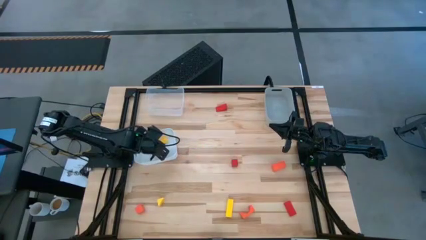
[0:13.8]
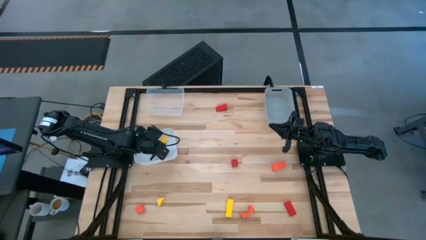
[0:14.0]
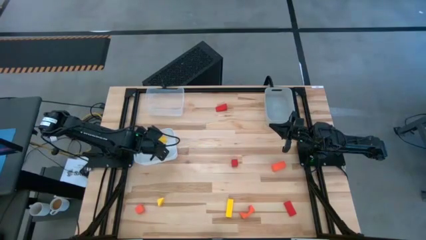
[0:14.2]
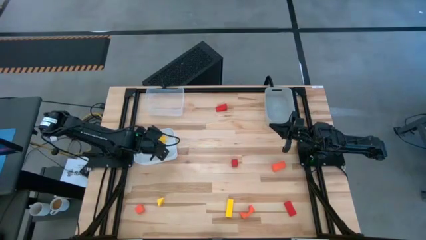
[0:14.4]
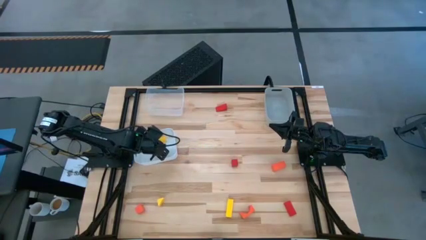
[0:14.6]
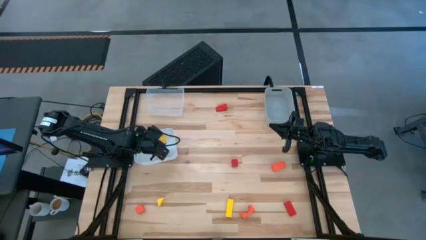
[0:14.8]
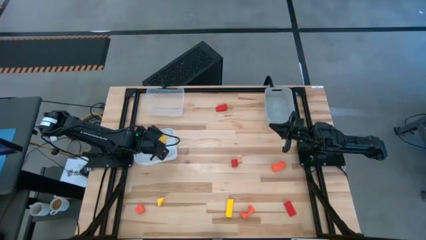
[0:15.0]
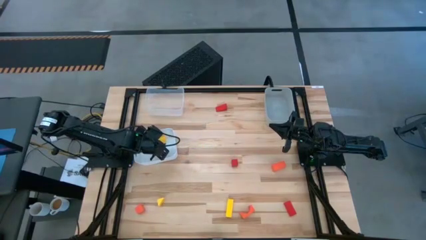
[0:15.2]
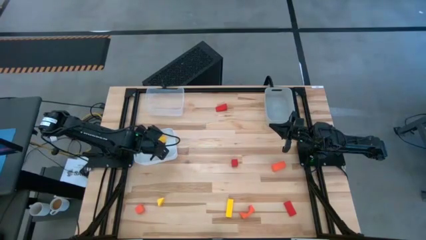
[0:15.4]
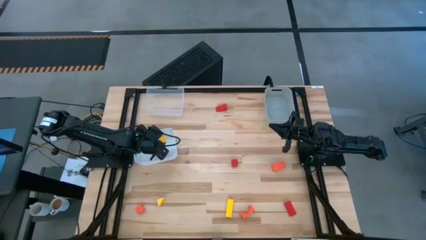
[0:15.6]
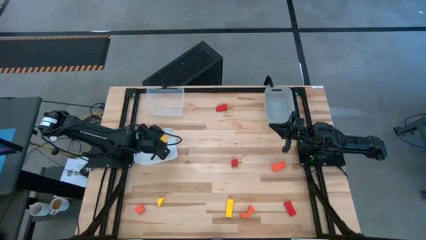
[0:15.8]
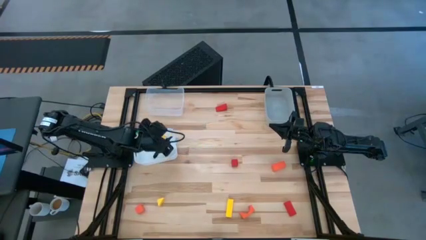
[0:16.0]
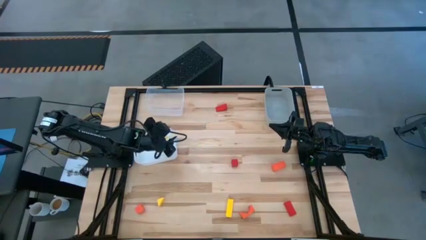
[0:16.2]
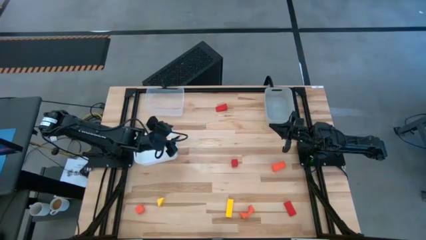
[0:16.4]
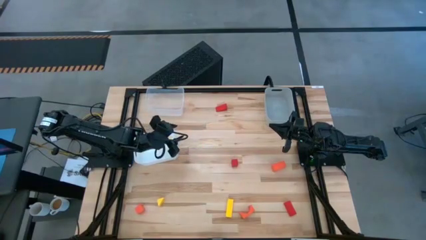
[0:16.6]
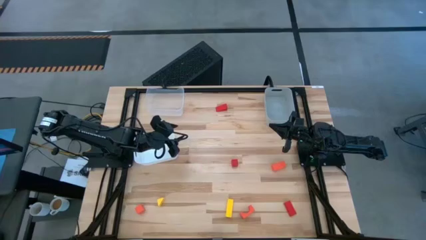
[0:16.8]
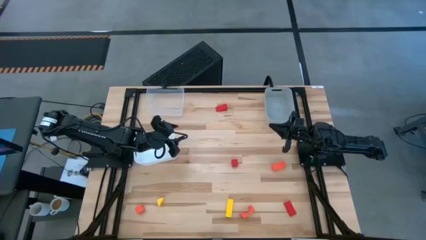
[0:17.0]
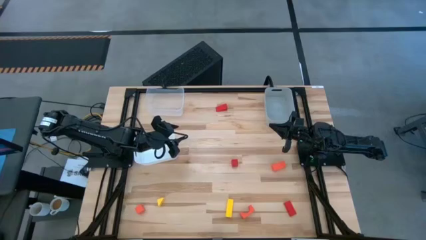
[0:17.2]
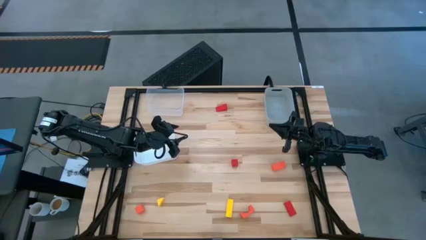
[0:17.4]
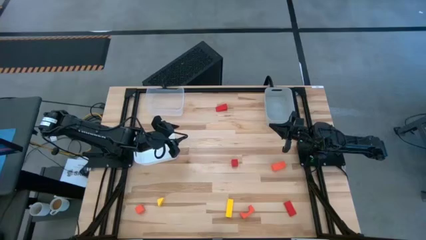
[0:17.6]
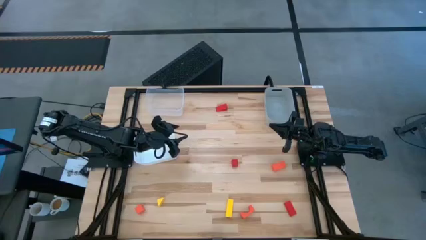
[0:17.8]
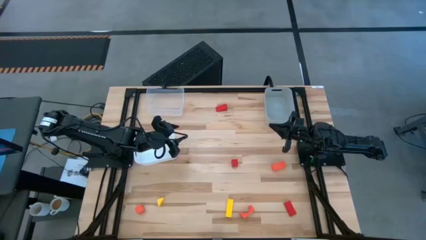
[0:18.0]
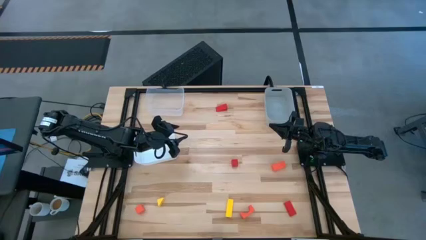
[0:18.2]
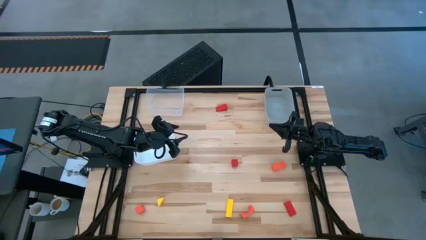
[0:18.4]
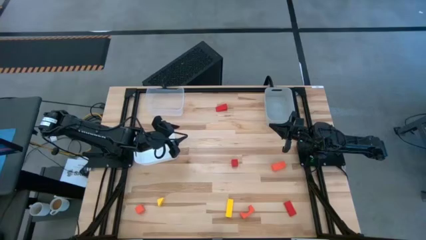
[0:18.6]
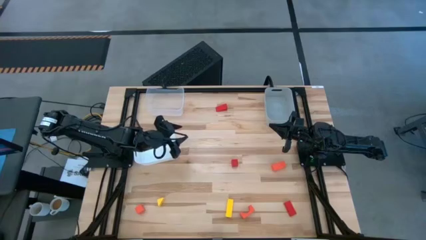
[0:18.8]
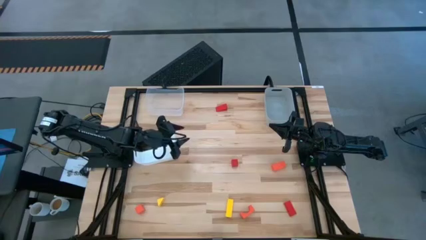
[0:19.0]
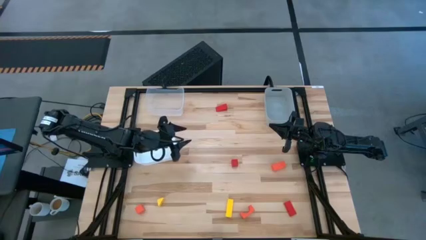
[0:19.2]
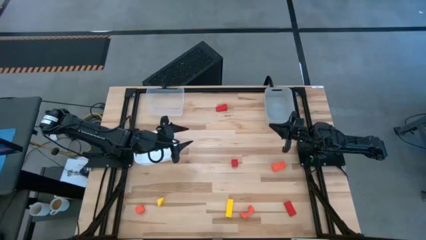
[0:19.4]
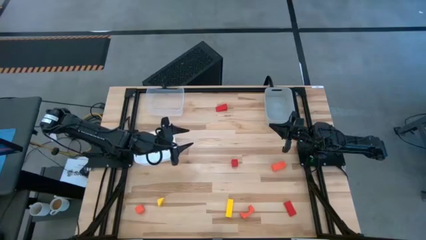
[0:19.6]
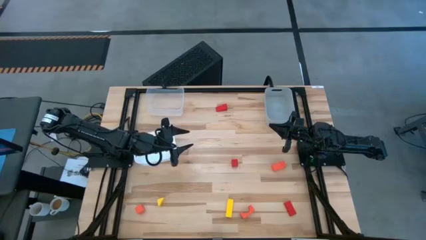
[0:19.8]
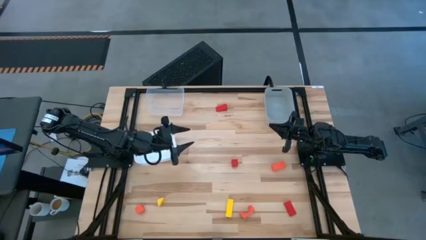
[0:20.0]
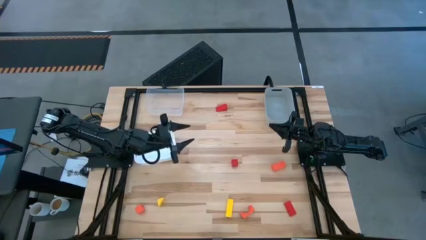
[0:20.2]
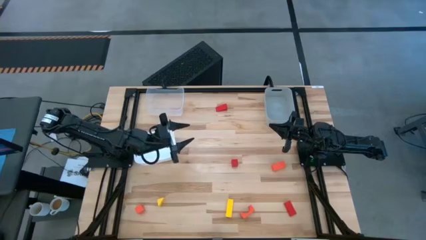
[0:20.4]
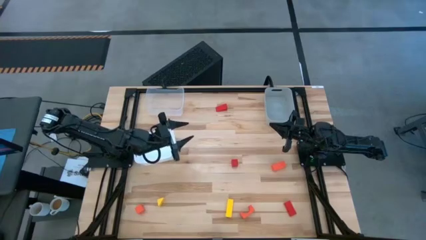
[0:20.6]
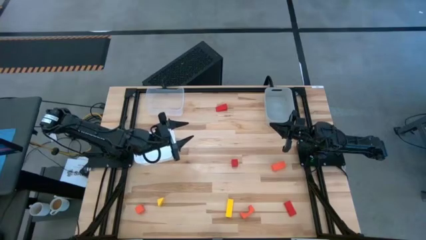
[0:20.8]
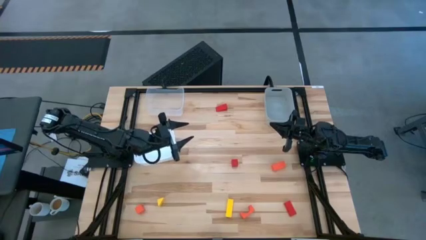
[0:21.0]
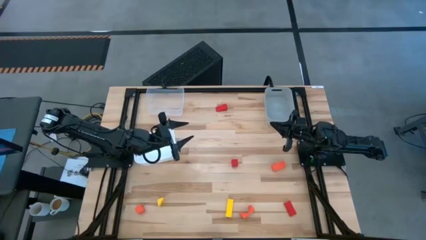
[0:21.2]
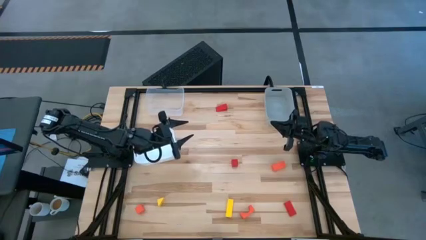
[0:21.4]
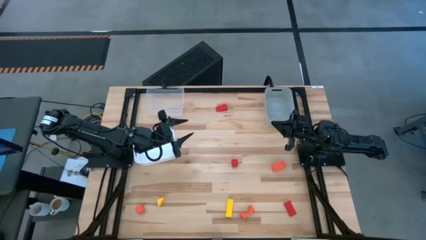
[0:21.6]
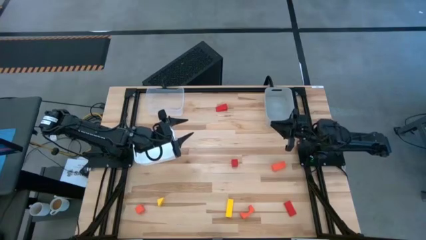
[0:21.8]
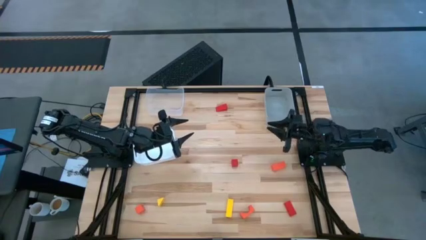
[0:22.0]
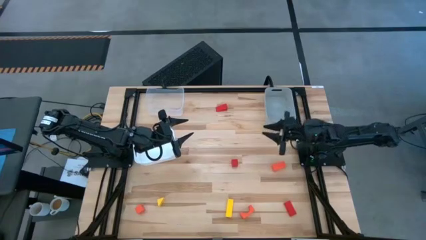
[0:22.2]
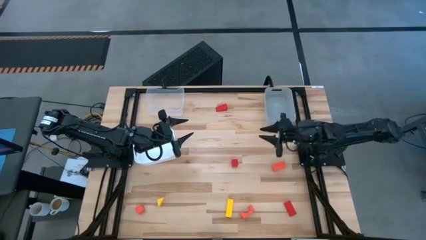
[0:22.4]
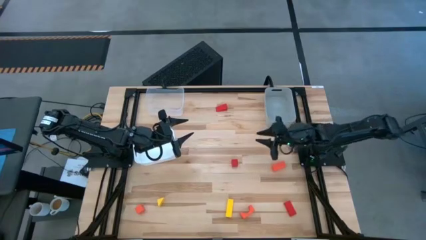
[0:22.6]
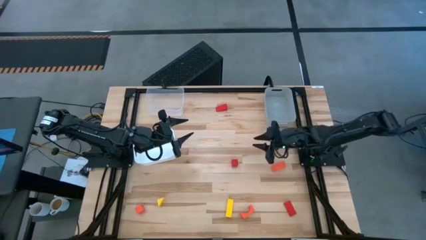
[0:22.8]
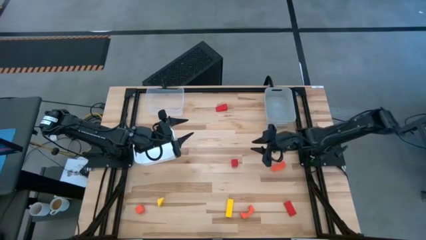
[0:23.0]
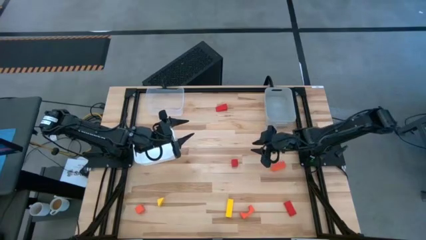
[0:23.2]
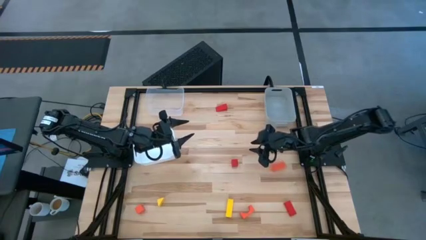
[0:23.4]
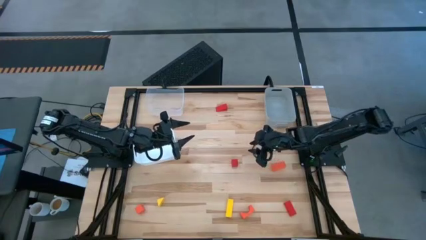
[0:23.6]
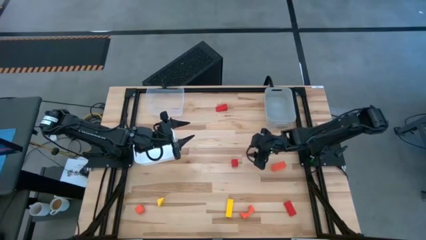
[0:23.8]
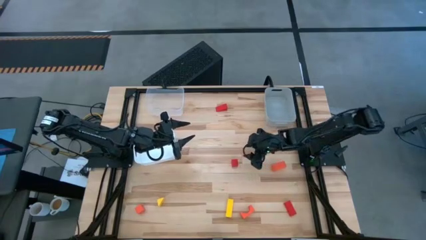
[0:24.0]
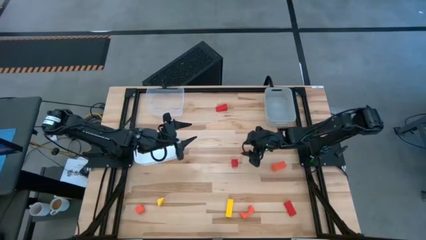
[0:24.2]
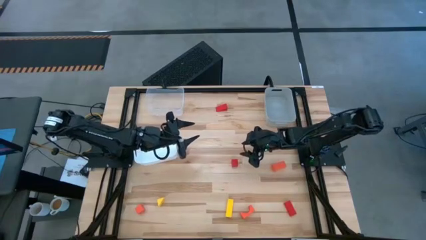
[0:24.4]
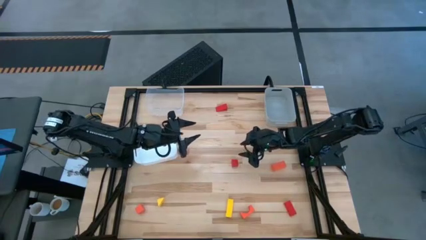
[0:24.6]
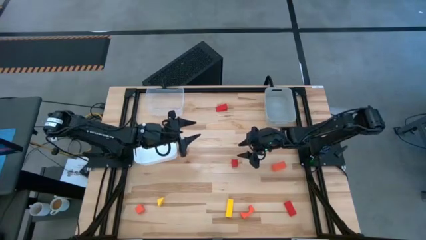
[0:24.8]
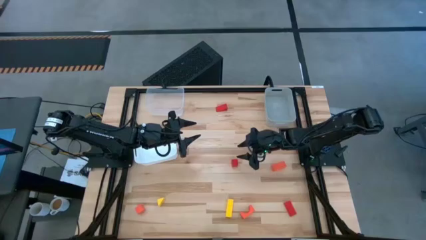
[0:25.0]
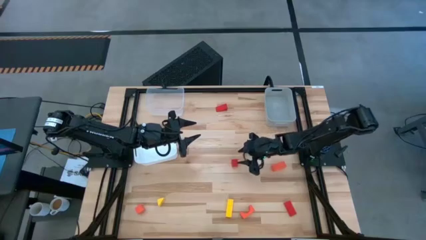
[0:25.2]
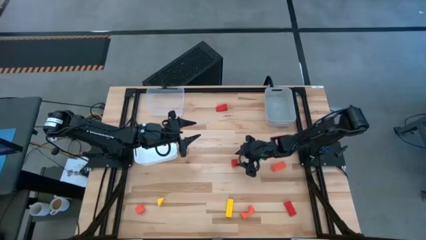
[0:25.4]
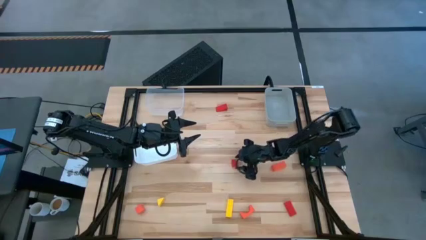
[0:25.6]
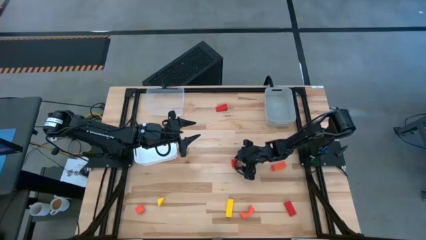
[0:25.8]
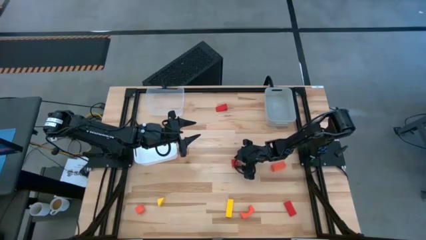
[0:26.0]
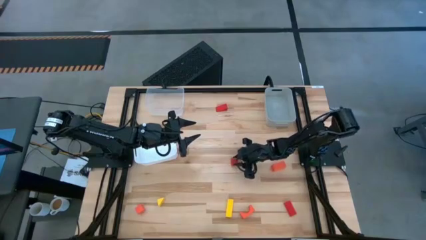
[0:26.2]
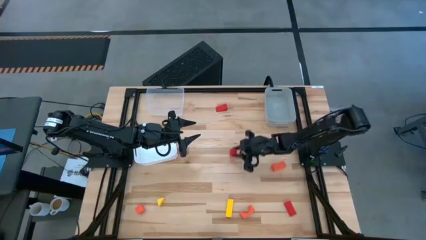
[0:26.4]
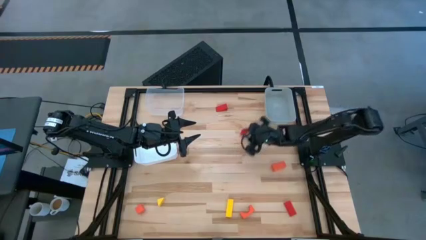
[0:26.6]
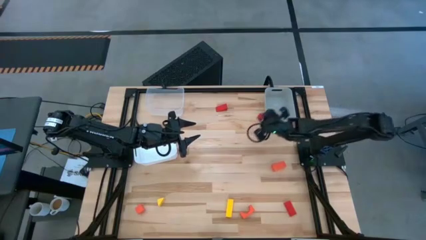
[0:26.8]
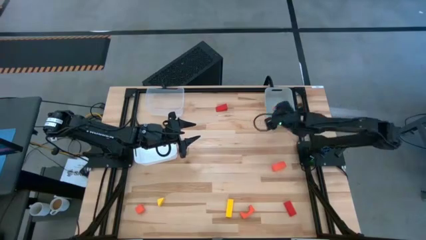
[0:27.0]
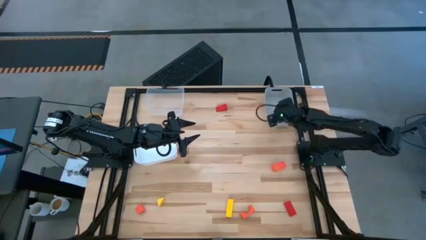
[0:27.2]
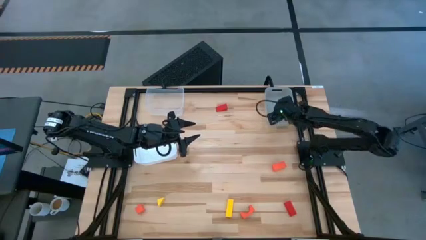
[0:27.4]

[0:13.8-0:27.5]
Task: Sort & place blocks by color
Put the middle red block into the gray bin
